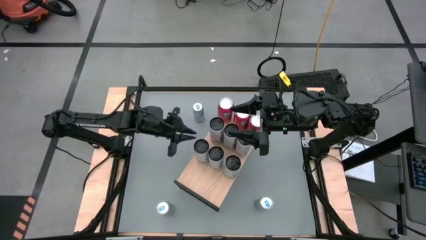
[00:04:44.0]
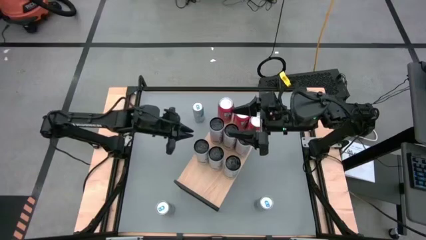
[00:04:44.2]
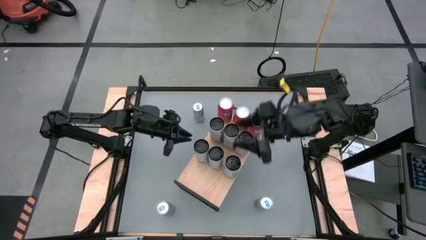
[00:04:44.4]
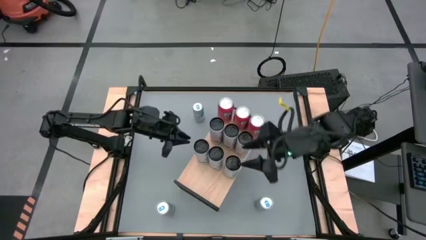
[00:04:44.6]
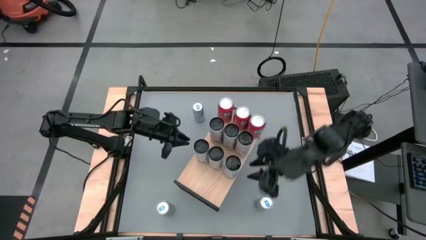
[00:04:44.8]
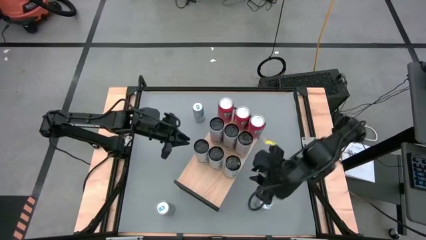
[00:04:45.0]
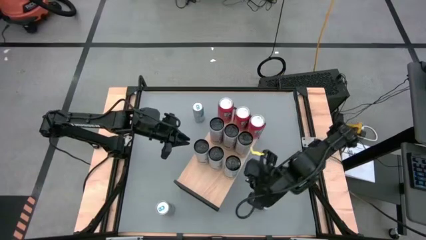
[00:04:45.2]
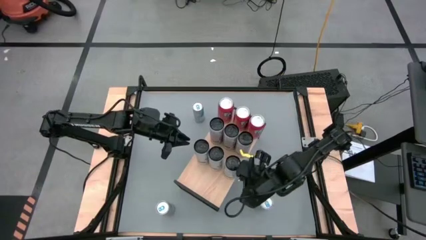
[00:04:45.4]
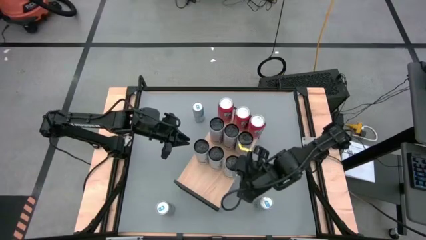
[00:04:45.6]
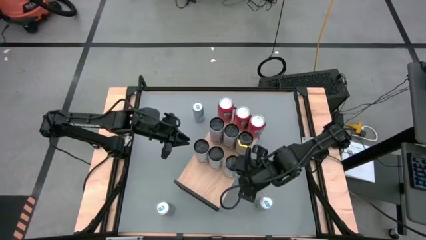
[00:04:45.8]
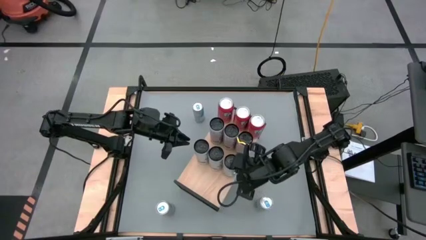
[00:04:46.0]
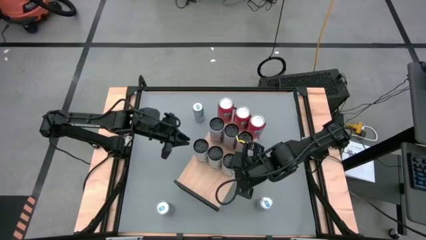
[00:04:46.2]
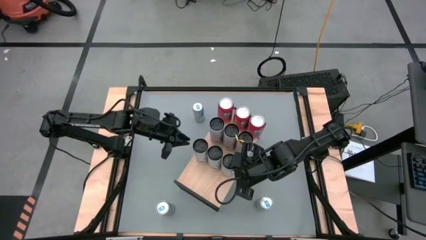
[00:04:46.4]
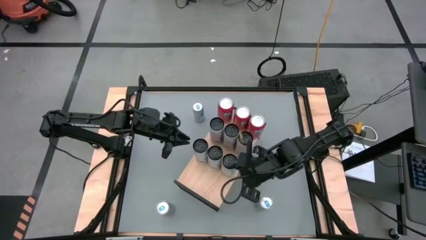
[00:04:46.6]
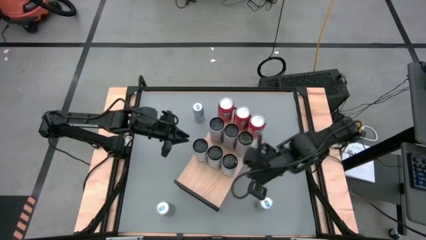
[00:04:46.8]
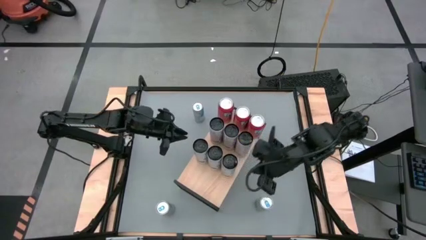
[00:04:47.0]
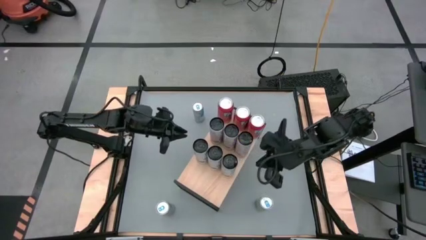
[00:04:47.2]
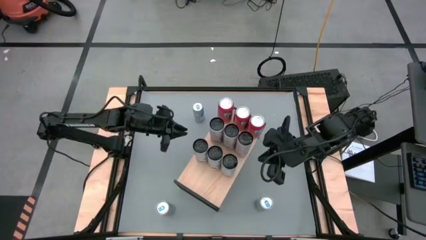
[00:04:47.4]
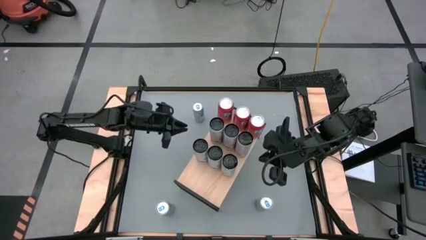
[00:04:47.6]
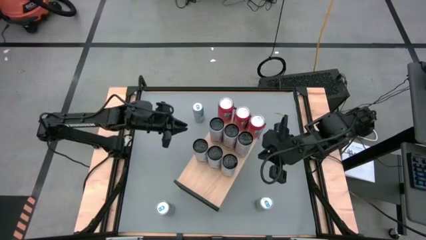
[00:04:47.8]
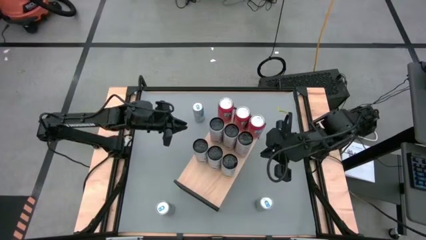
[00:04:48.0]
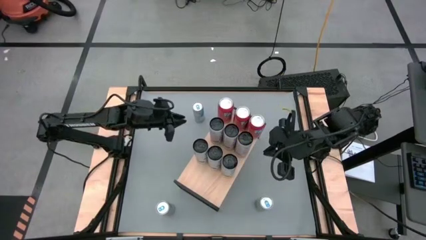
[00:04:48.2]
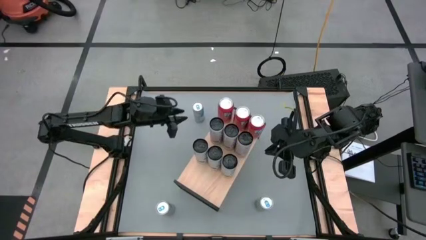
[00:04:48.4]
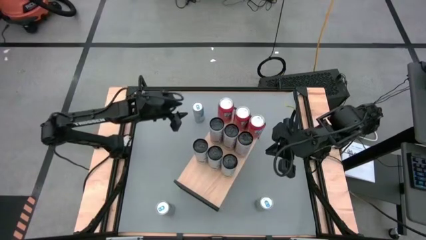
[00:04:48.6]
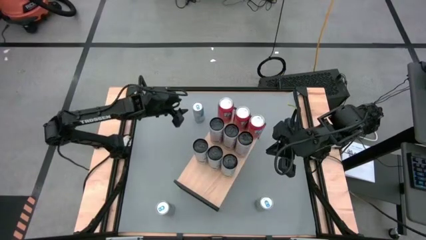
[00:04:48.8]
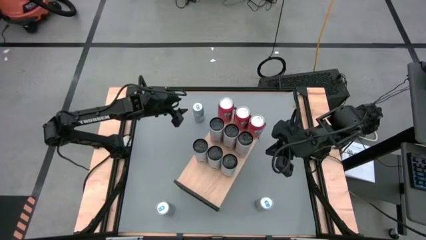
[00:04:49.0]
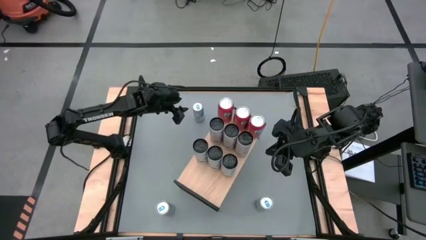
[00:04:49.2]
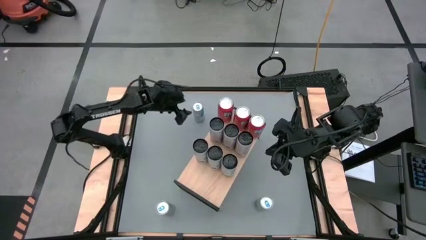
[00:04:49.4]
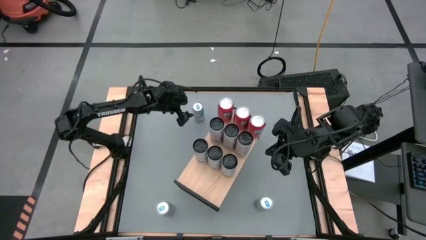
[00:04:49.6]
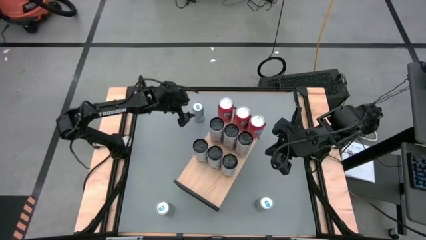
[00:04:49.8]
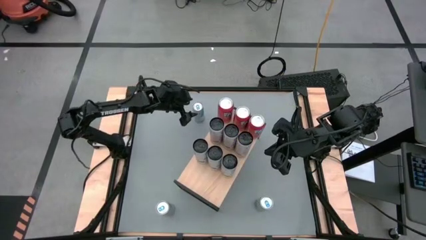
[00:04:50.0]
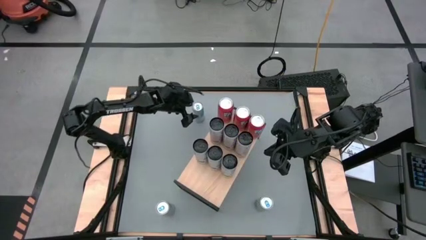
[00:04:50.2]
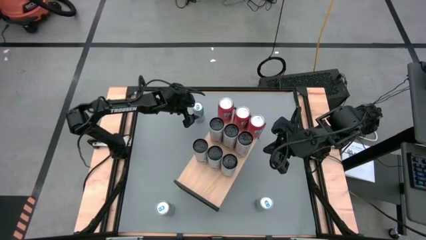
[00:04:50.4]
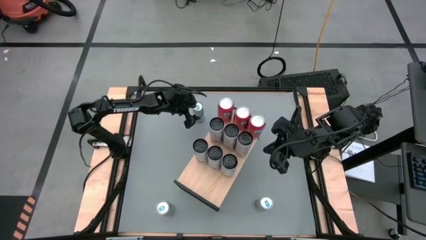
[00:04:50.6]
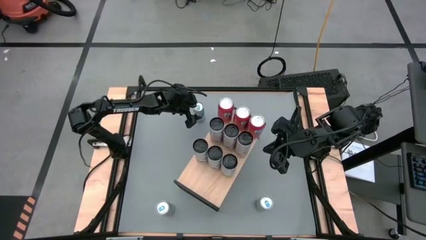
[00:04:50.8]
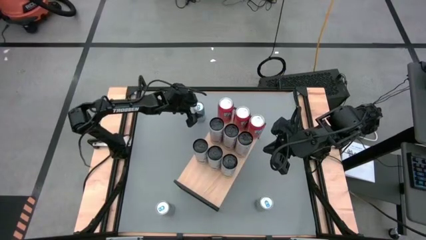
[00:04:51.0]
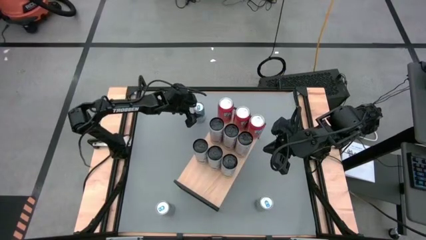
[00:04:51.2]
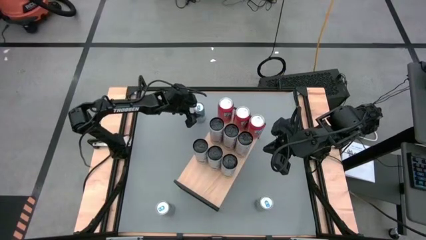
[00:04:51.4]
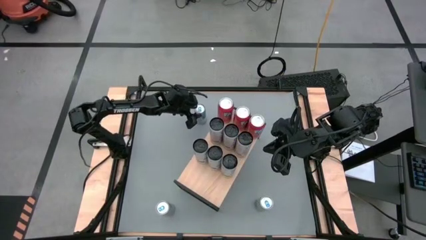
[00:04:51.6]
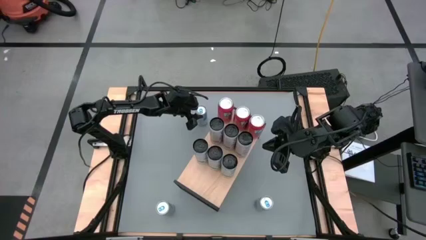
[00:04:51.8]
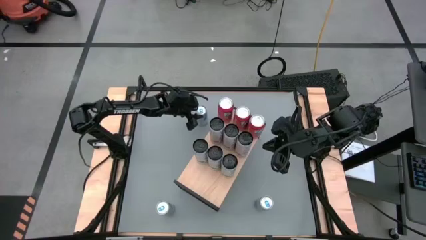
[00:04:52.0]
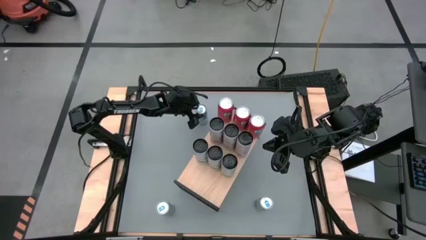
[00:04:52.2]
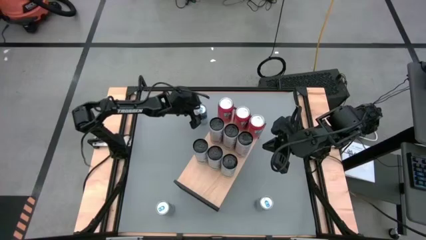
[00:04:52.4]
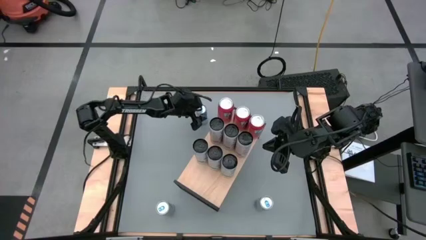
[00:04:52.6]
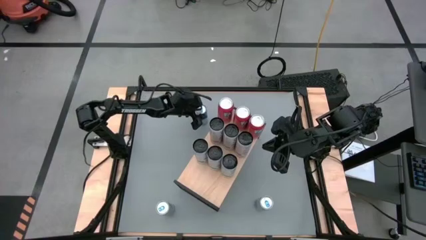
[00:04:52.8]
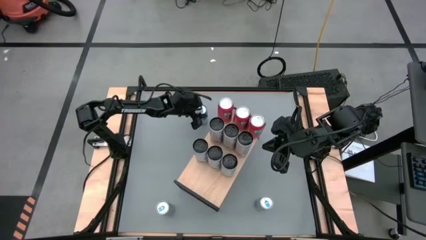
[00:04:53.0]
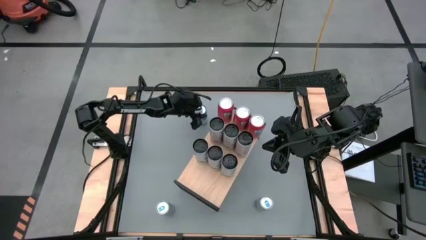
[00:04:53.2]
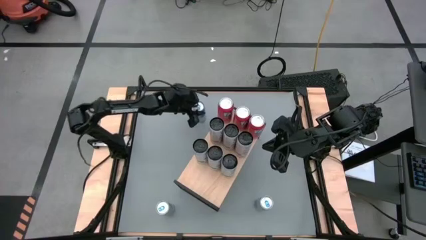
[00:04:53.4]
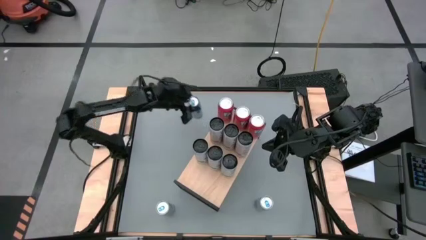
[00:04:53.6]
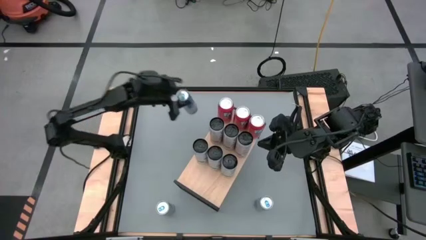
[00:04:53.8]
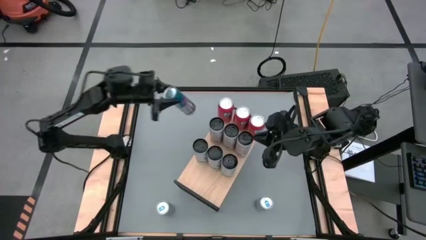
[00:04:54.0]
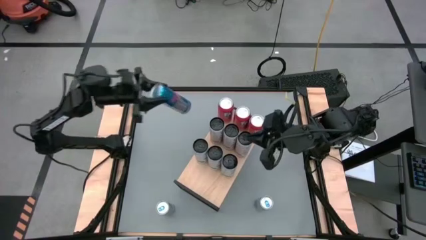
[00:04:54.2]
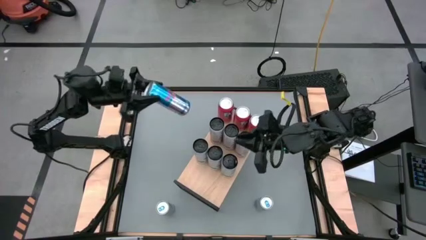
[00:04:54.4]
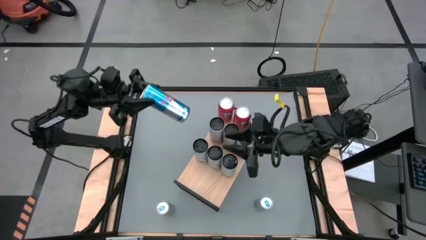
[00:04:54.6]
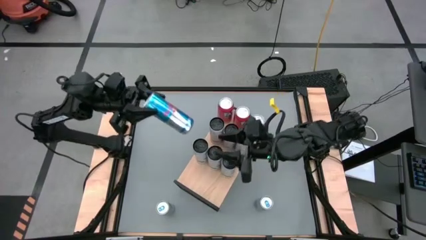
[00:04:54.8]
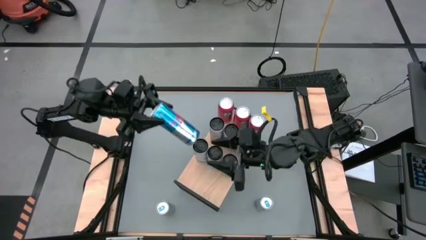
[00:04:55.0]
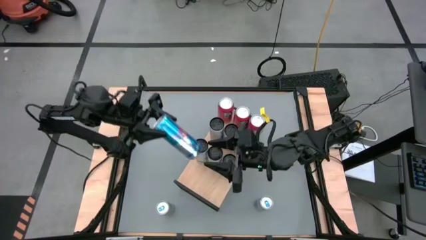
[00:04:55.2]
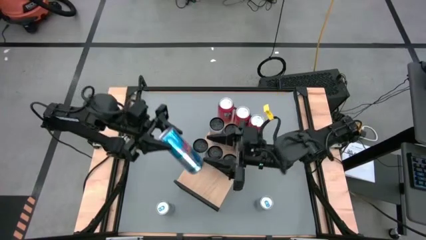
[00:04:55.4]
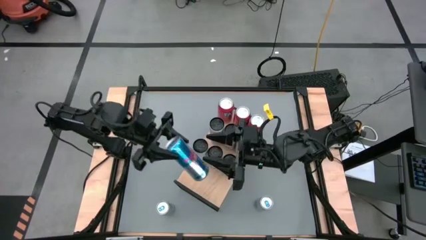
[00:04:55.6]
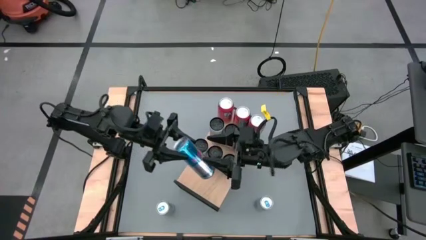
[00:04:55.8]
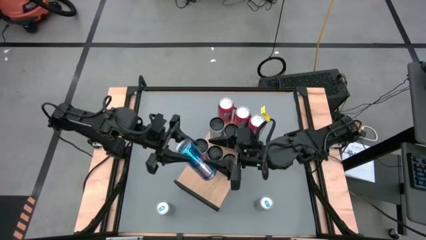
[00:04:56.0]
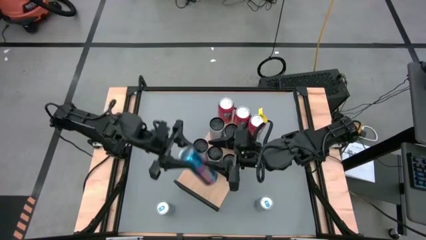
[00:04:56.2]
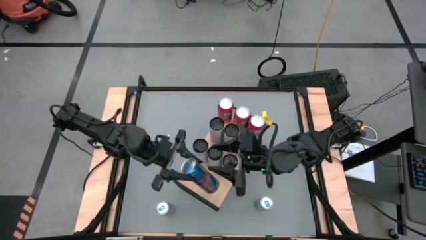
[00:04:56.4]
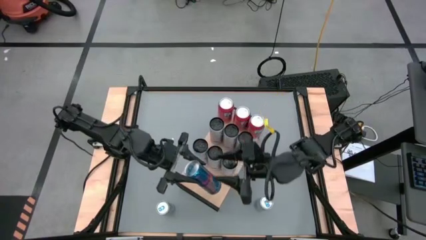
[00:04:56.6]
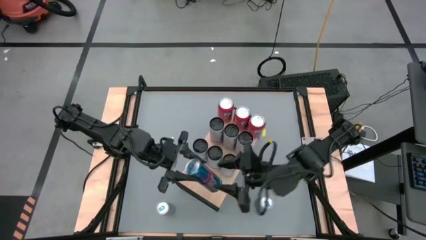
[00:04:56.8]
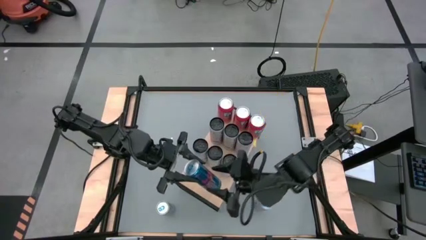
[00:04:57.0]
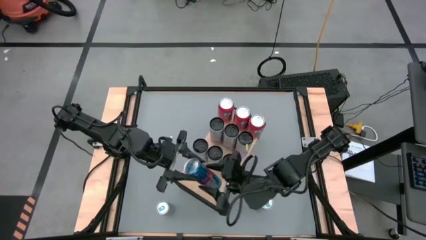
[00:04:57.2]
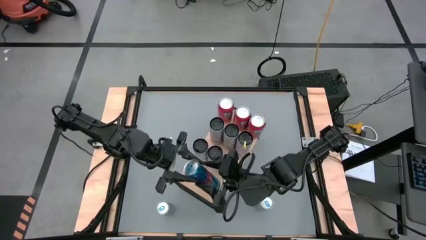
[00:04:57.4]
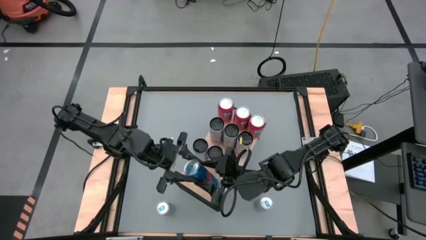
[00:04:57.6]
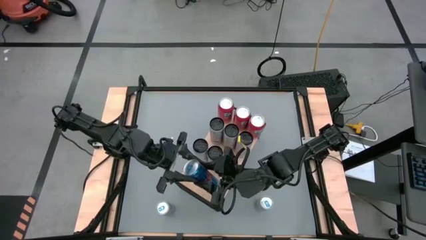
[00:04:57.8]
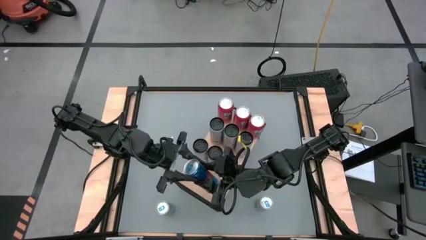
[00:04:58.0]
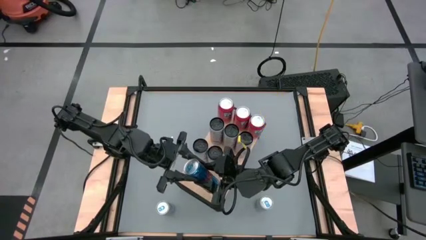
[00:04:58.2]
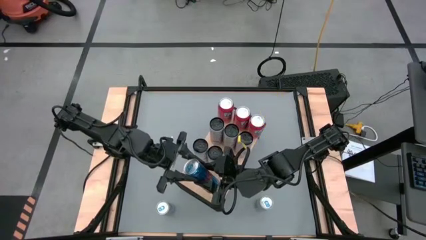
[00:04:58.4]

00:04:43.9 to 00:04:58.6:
Task: Place canned beverage on shelf
Put the blue soda can on the shelf
